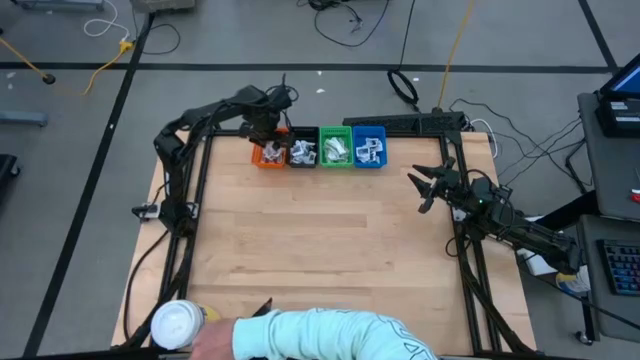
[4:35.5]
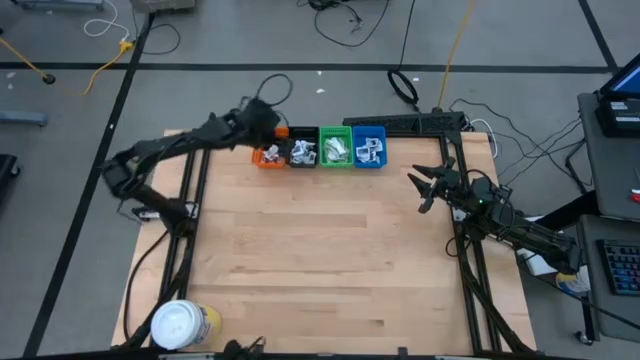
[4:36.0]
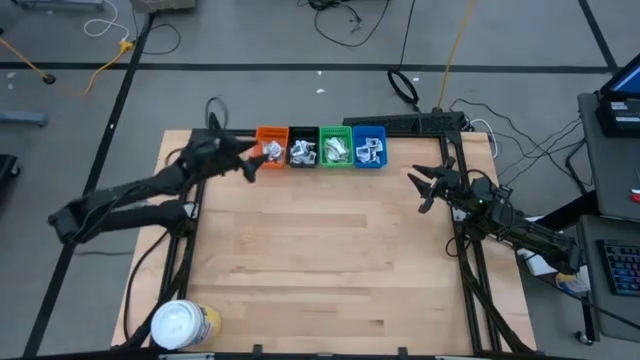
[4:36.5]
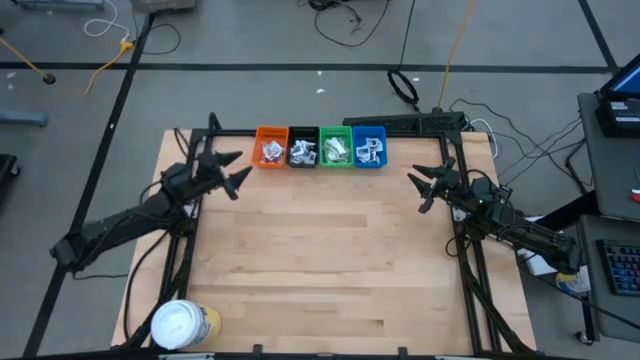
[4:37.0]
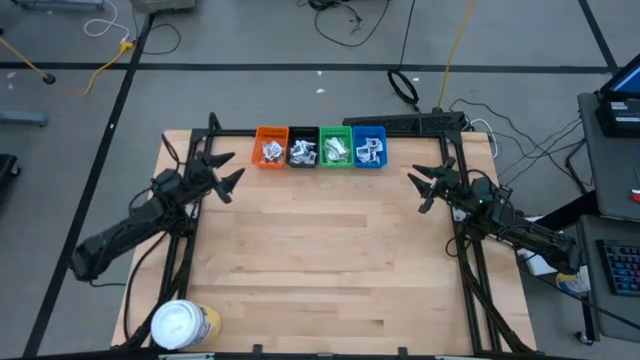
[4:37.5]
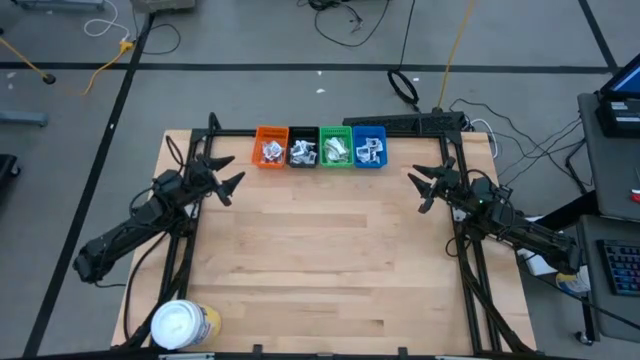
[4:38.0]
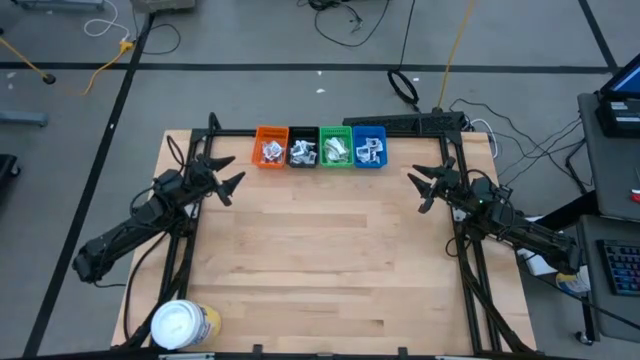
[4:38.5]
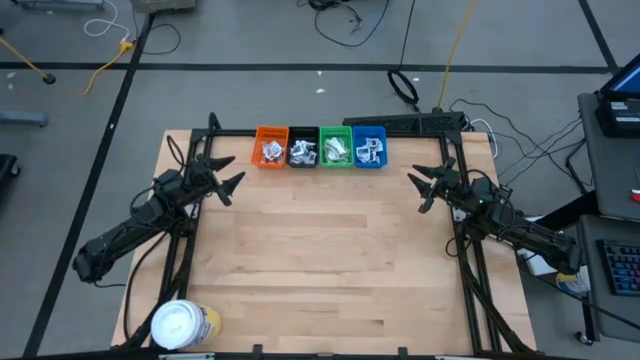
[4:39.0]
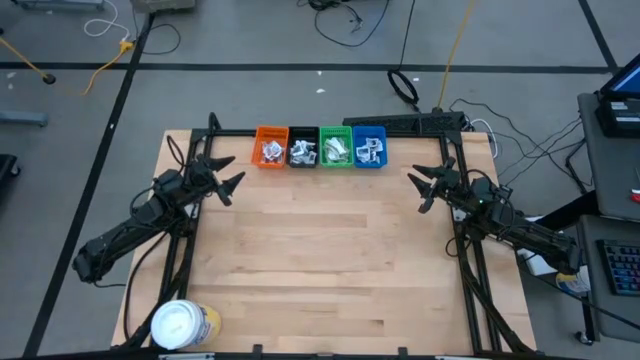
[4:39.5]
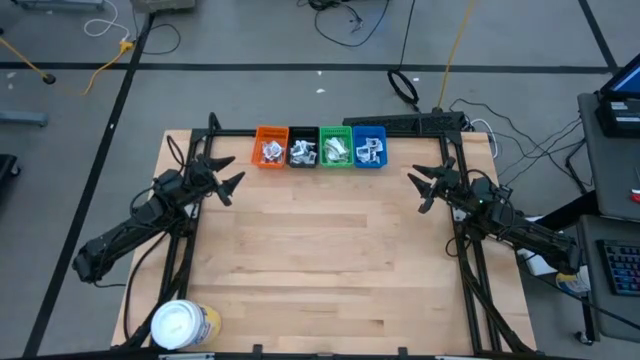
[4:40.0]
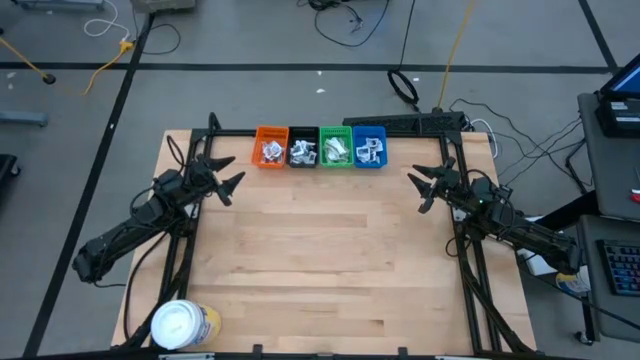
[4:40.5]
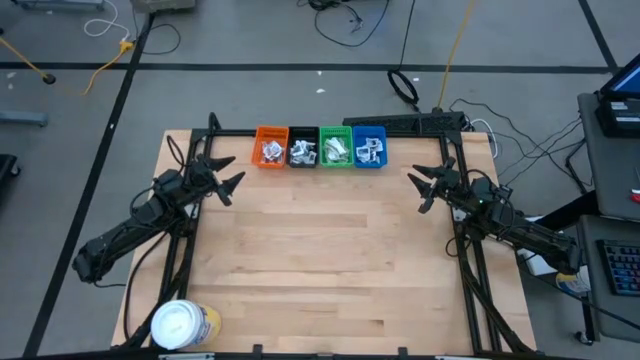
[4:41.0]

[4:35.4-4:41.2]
Task: Pick & Place First Aid Supplies
Return to home position

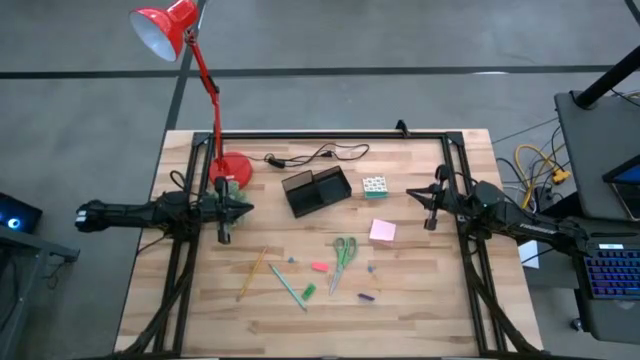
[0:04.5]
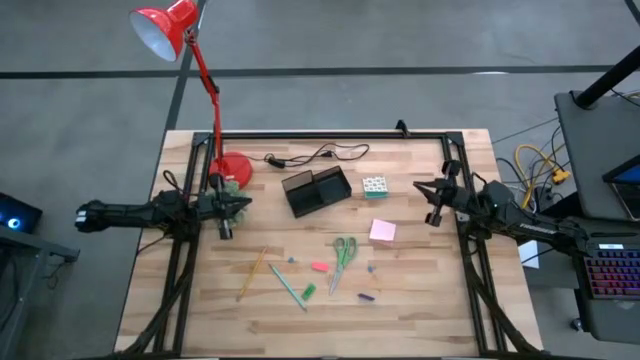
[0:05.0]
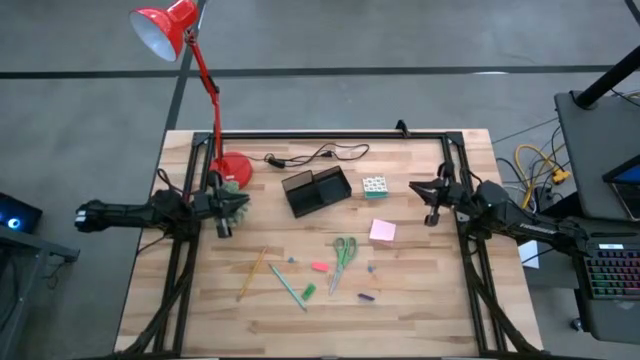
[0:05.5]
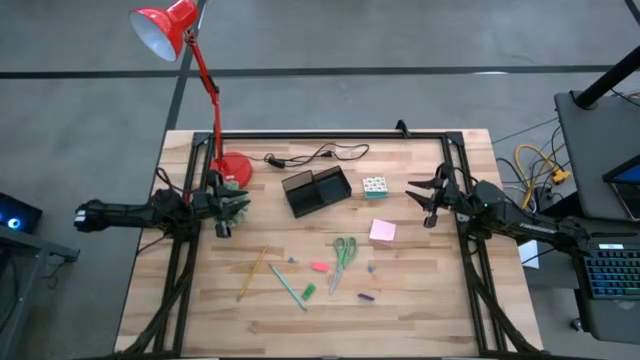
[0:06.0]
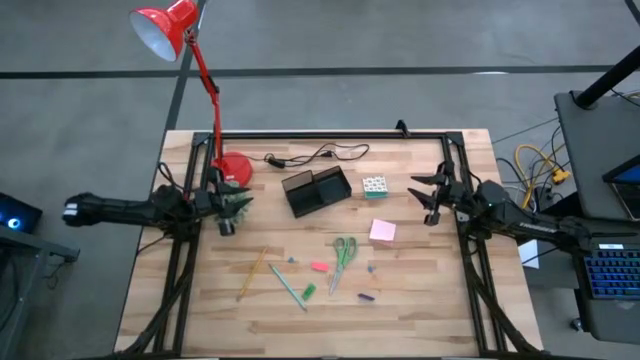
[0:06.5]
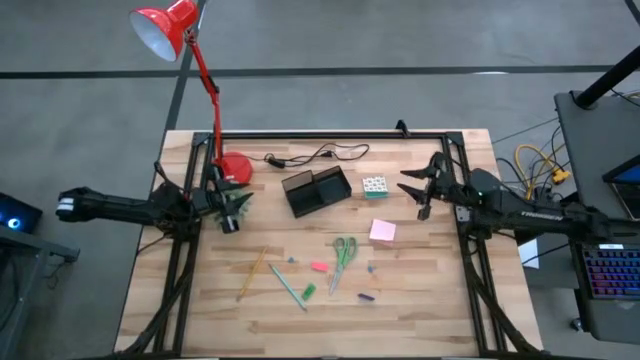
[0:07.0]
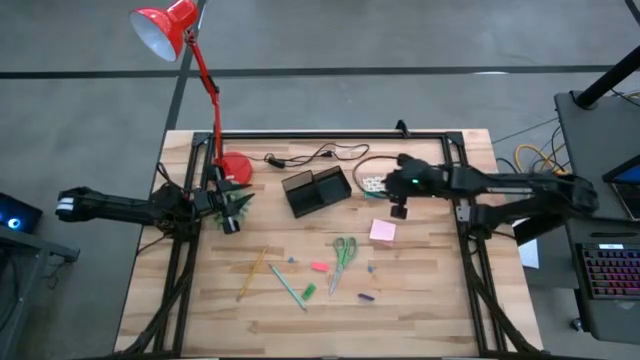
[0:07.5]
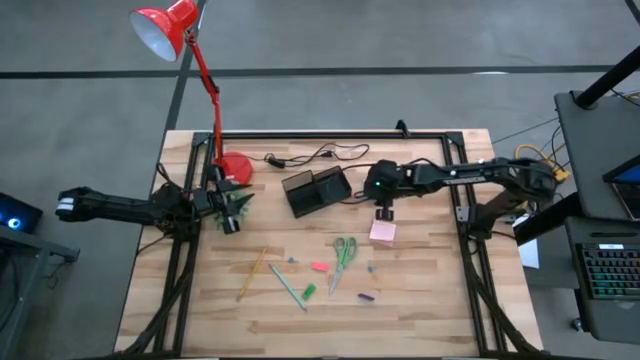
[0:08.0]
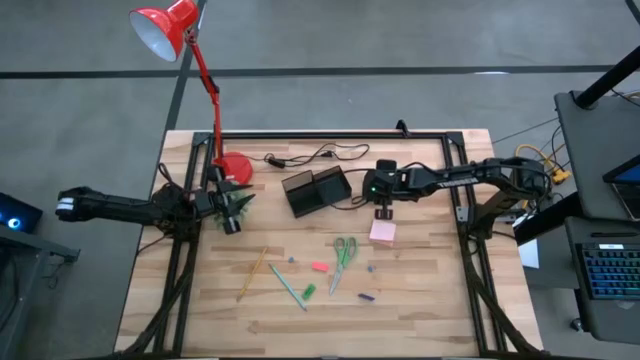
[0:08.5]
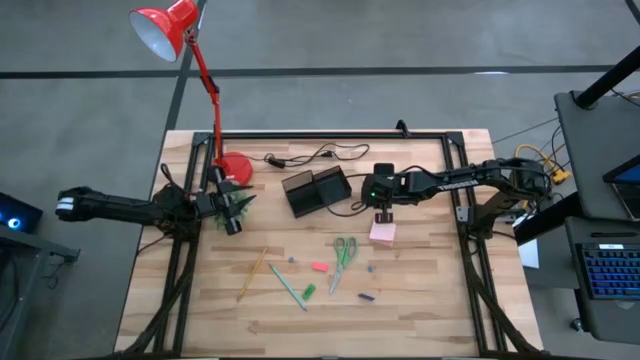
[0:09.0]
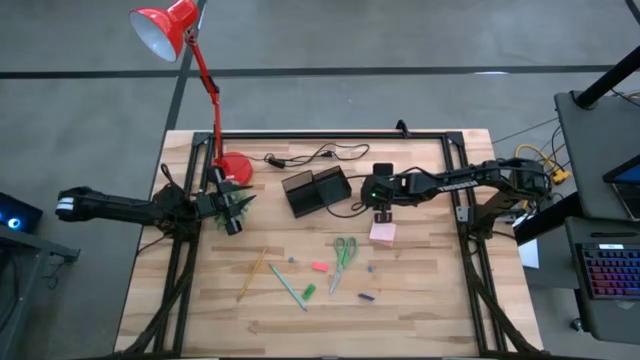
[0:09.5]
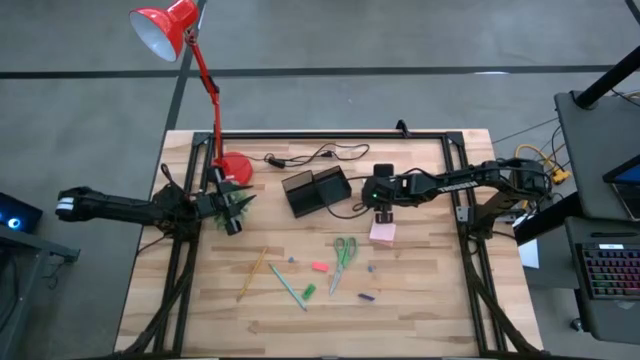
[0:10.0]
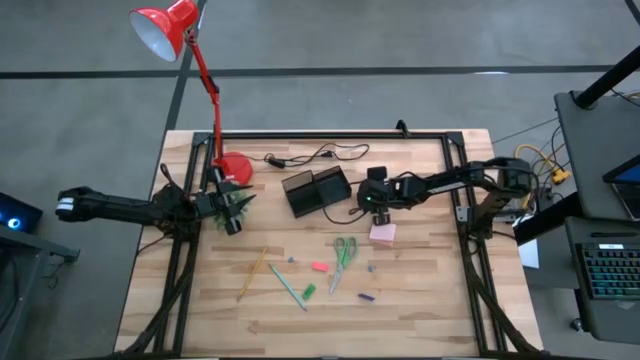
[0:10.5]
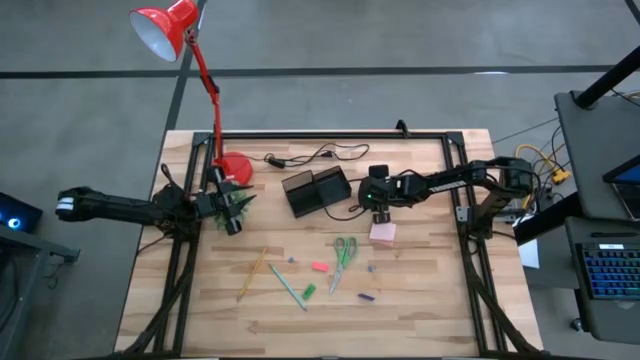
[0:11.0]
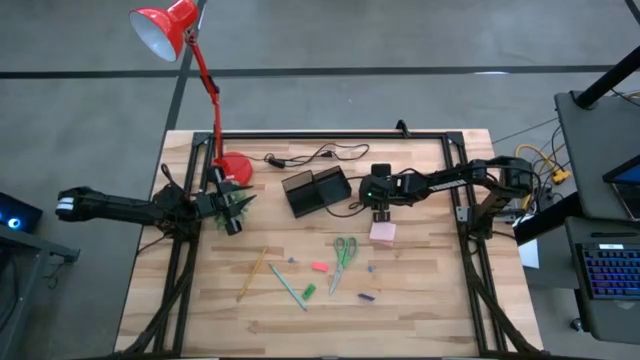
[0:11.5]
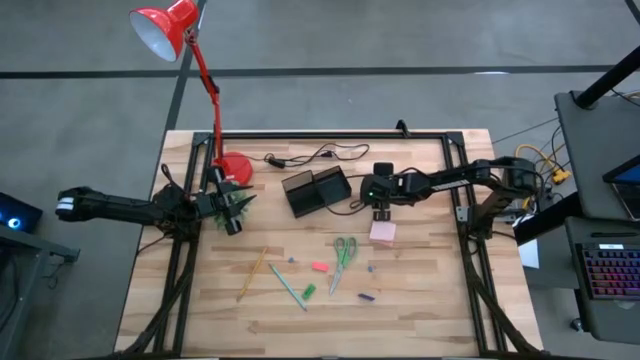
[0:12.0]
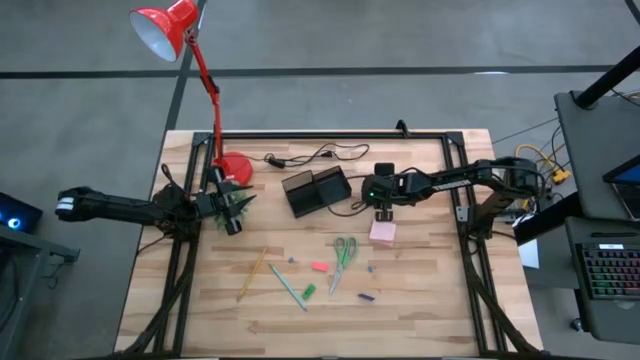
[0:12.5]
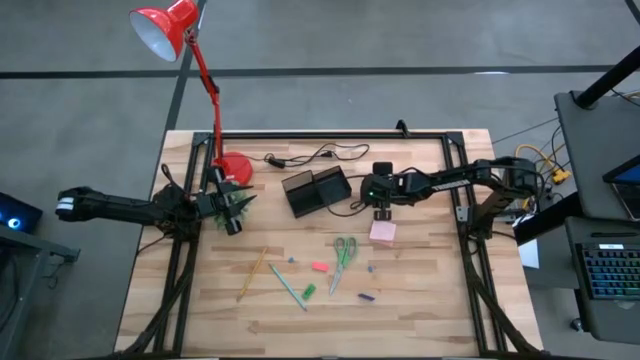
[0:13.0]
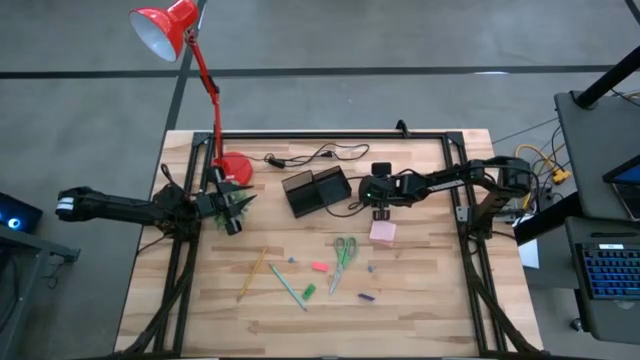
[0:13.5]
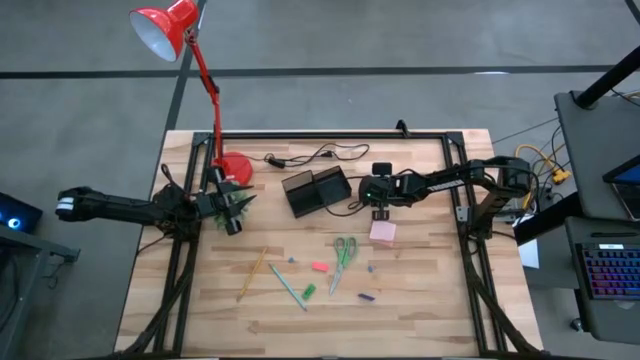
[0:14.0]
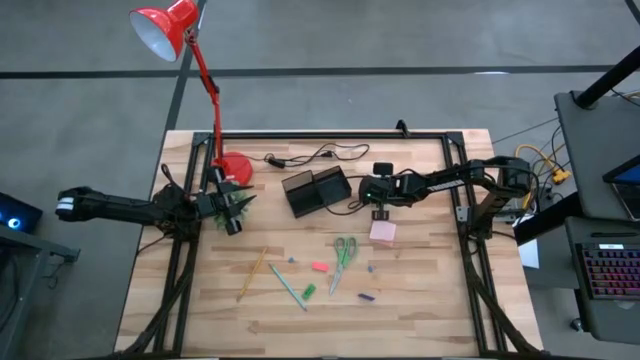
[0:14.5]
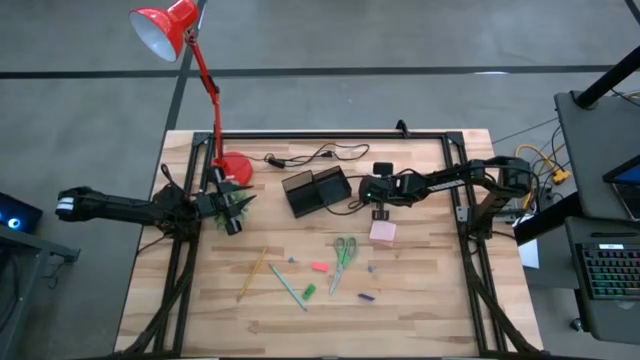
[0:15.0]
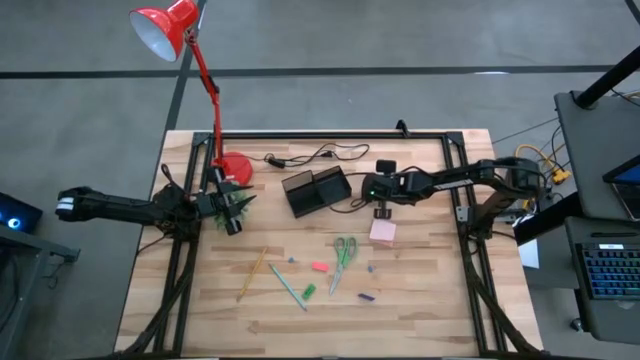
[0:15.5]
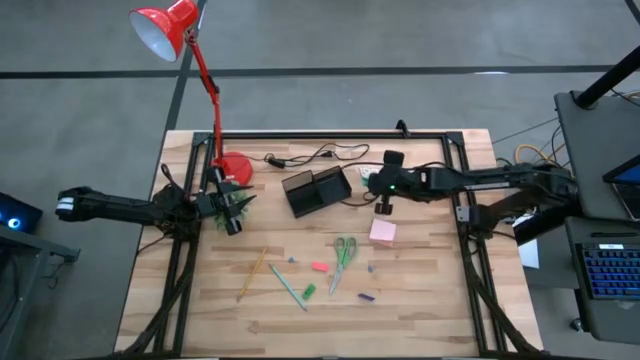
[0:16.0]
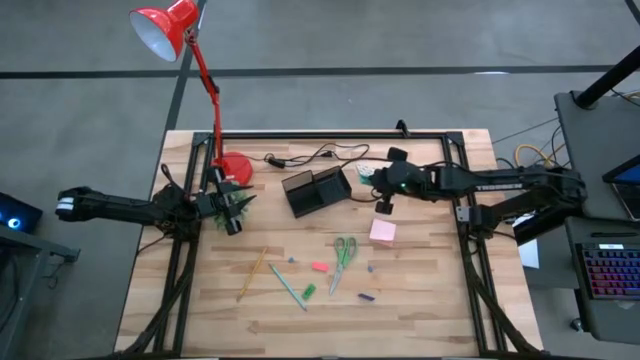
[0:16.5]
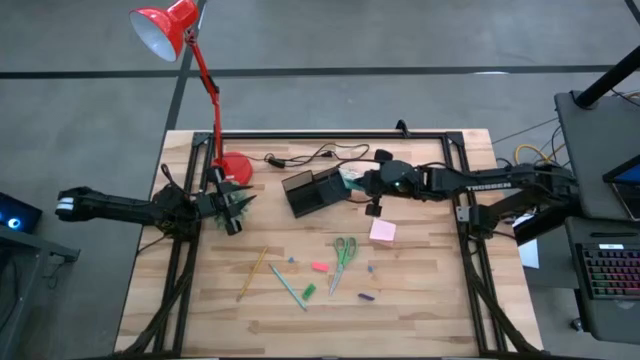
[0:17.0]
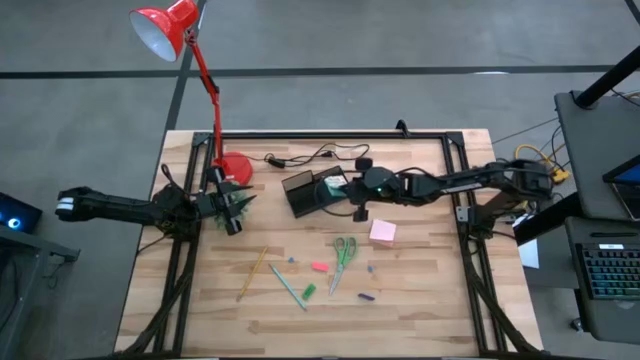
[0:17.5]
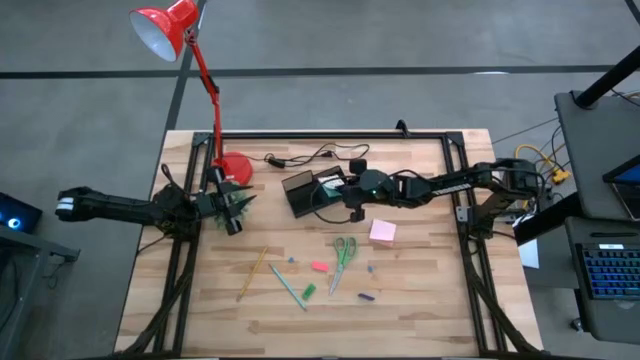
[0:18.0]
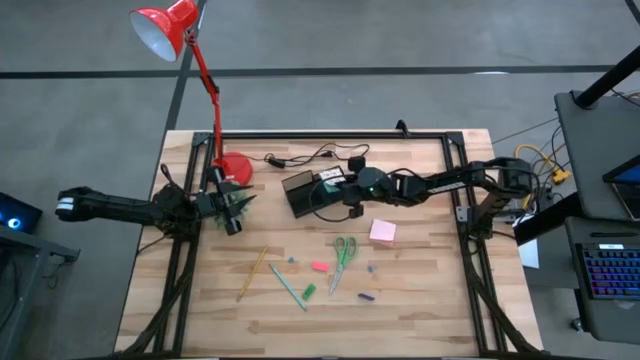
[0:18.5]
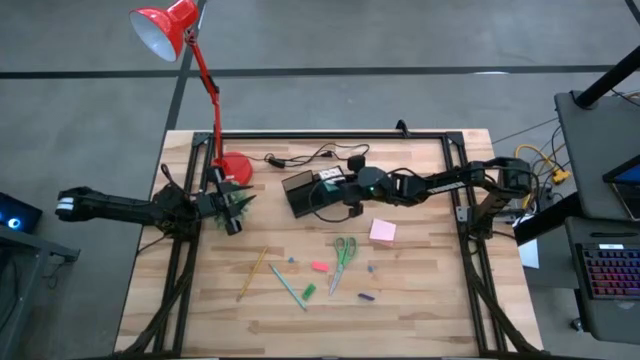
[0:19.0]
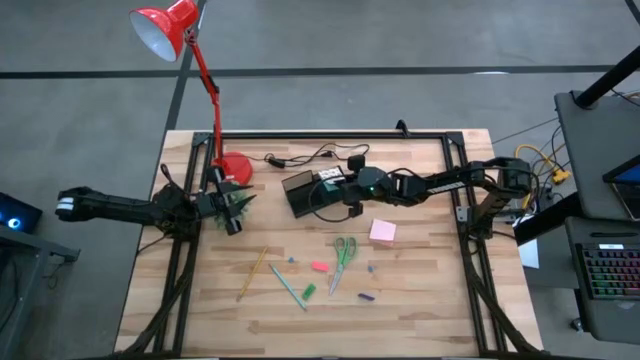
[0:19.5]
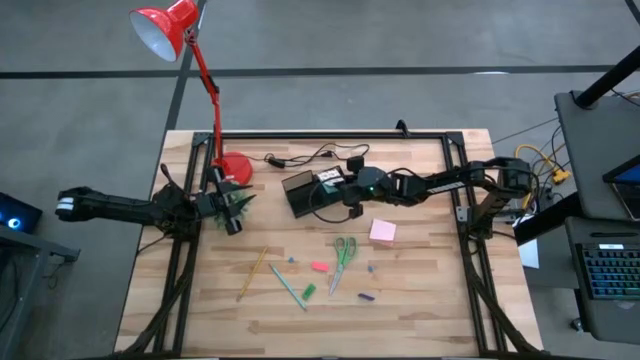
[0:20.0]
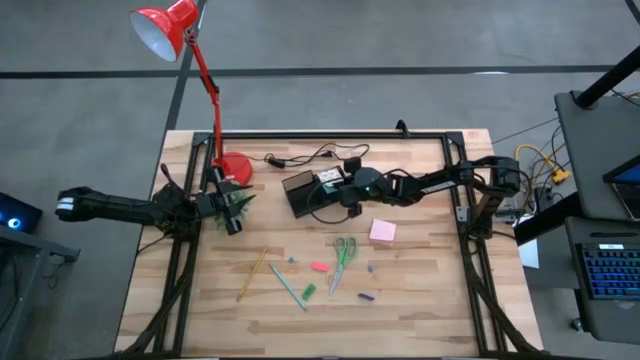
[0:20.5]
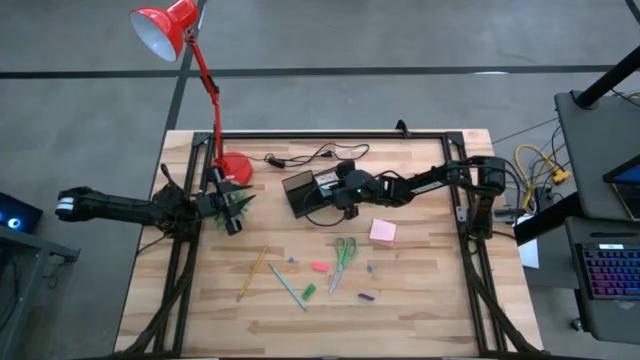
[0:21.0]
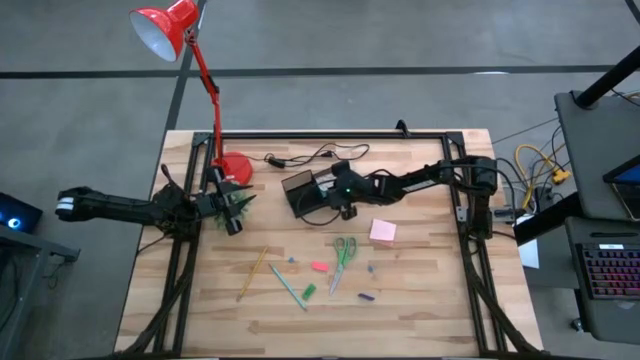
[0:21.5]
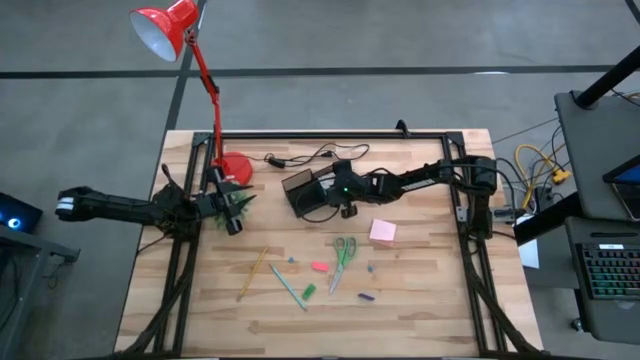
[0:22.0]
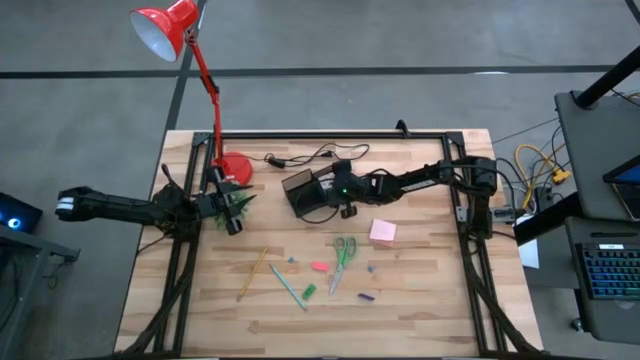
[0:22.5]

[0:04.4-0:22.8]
Task: Pick and place office supplies into organizer
Put the blue sticky note into the black desk organizer
